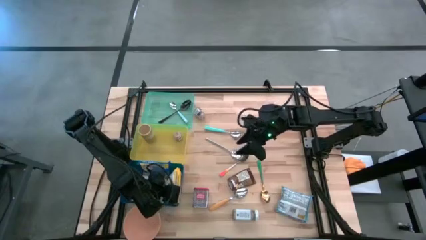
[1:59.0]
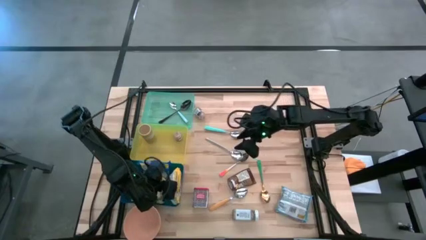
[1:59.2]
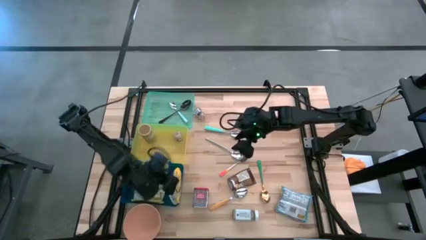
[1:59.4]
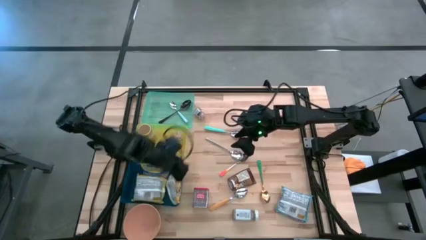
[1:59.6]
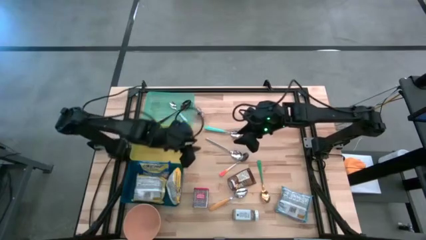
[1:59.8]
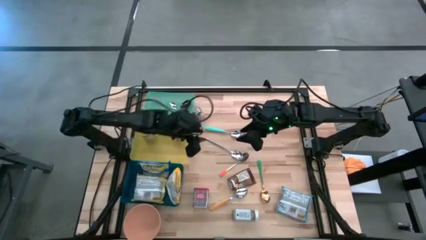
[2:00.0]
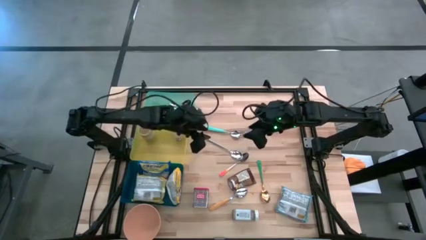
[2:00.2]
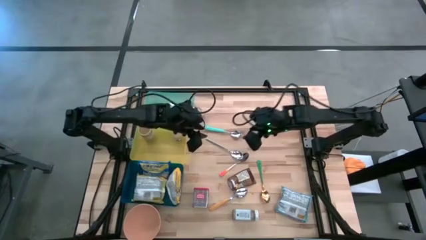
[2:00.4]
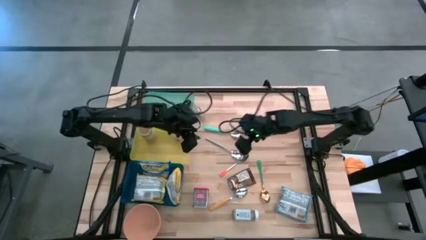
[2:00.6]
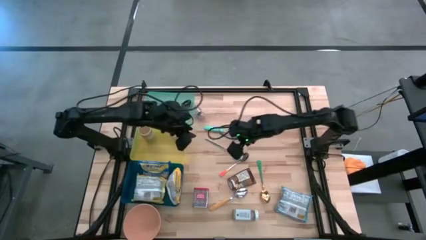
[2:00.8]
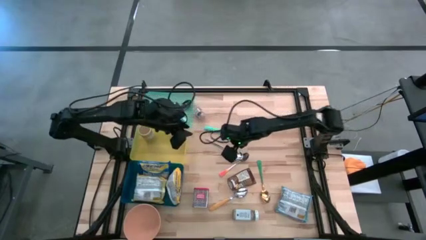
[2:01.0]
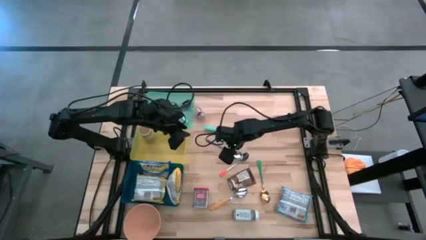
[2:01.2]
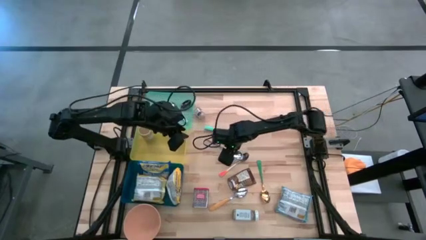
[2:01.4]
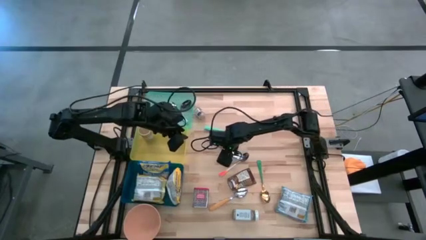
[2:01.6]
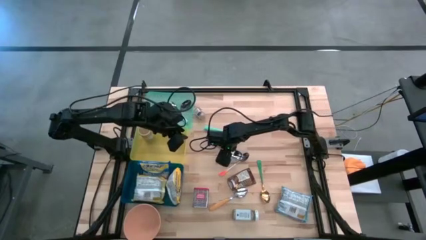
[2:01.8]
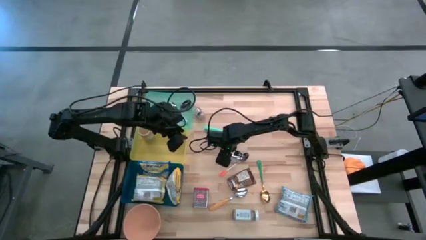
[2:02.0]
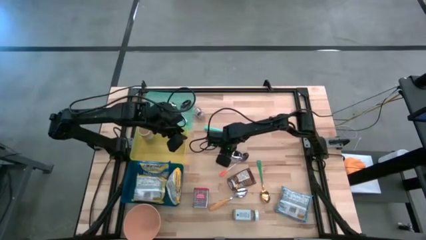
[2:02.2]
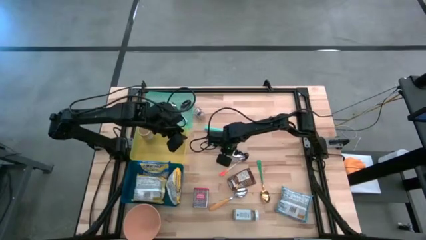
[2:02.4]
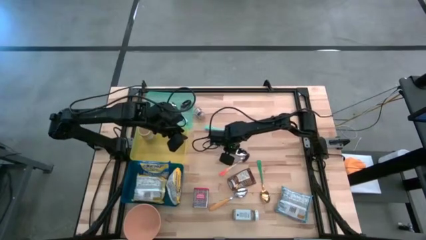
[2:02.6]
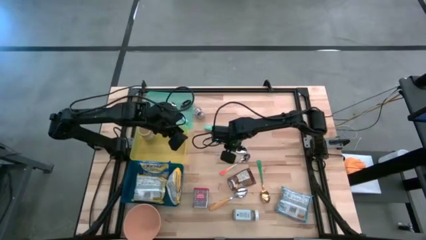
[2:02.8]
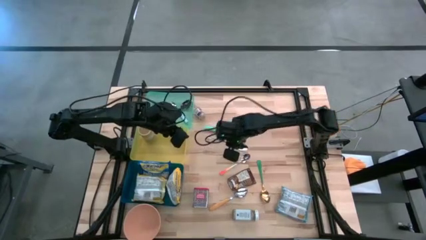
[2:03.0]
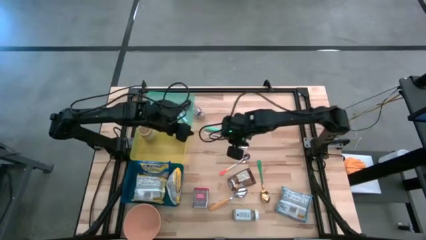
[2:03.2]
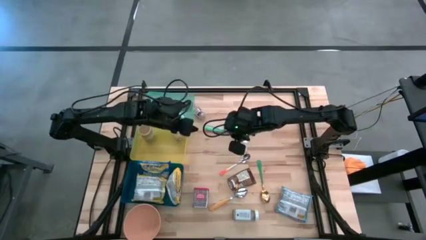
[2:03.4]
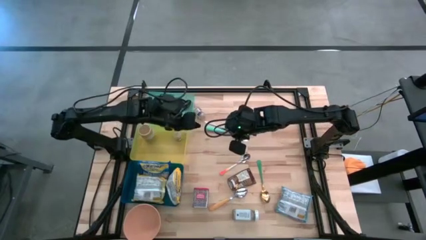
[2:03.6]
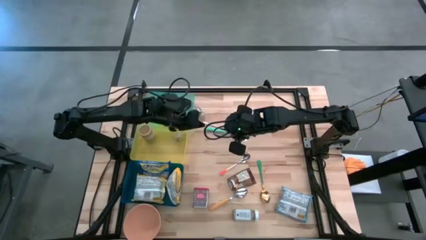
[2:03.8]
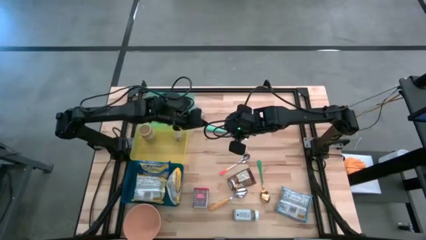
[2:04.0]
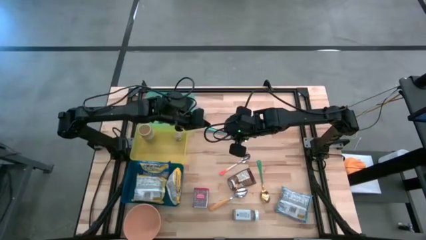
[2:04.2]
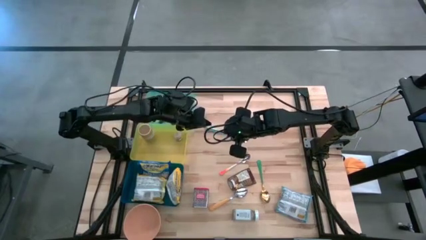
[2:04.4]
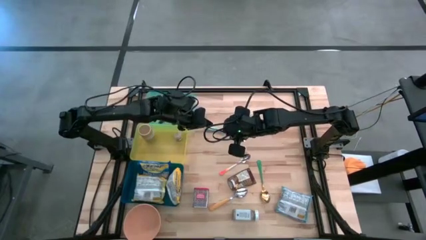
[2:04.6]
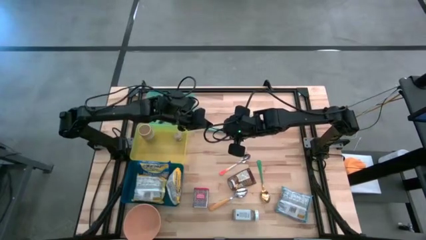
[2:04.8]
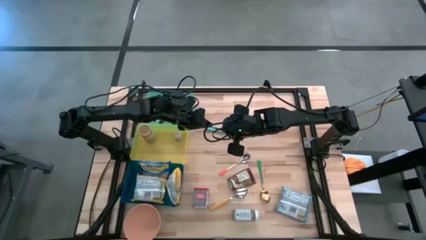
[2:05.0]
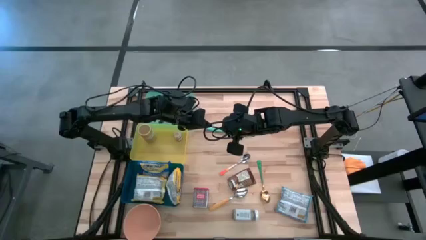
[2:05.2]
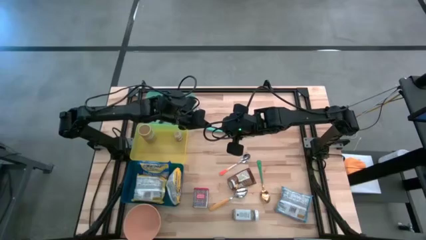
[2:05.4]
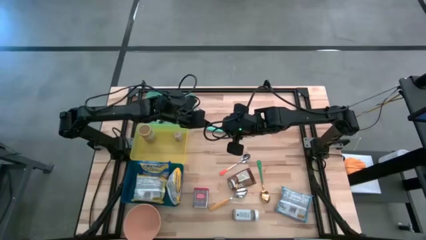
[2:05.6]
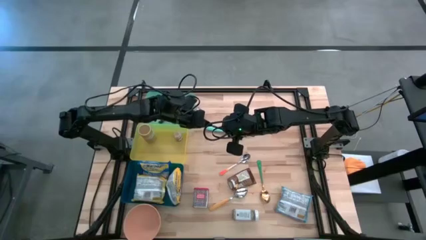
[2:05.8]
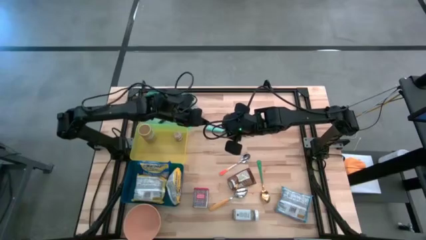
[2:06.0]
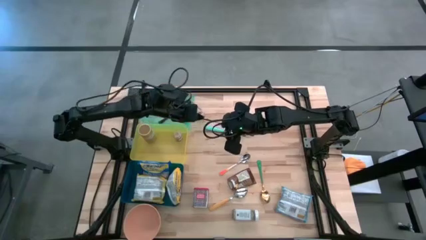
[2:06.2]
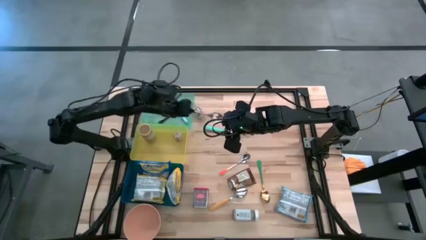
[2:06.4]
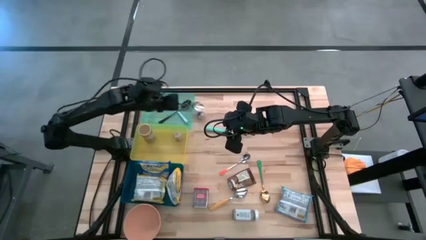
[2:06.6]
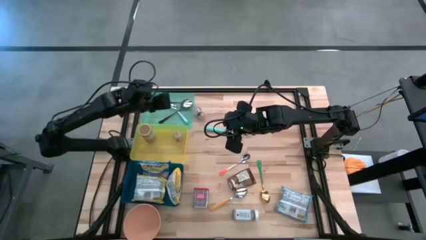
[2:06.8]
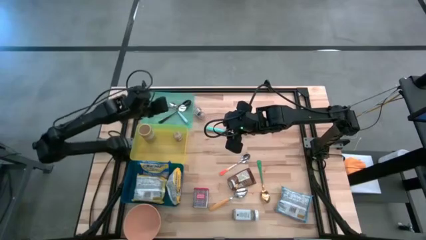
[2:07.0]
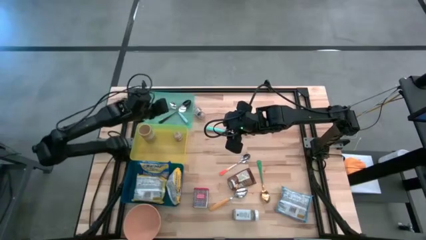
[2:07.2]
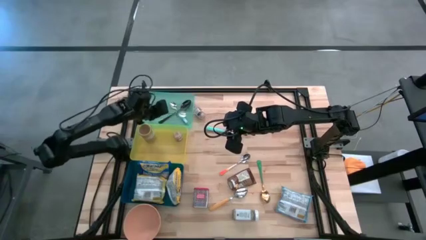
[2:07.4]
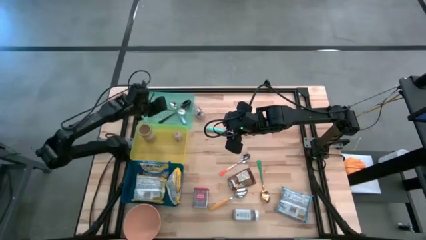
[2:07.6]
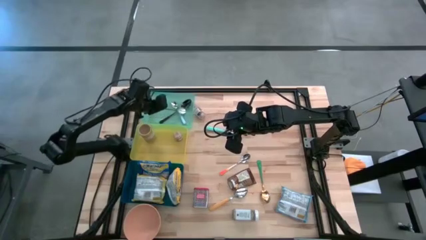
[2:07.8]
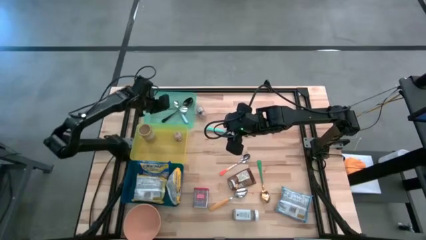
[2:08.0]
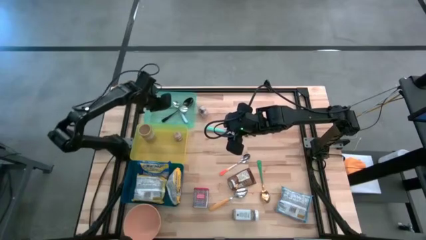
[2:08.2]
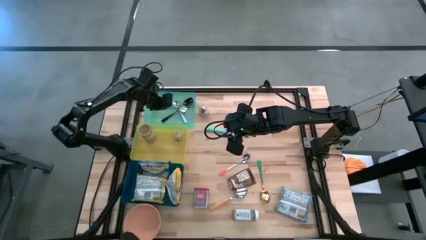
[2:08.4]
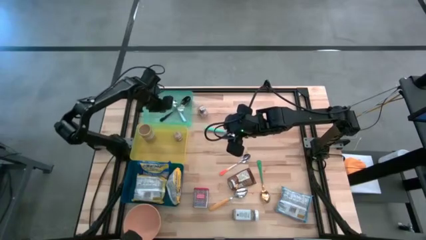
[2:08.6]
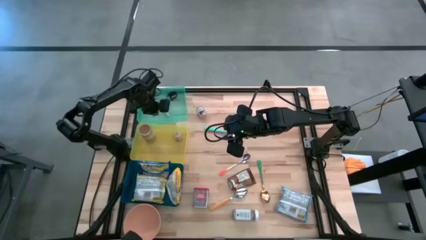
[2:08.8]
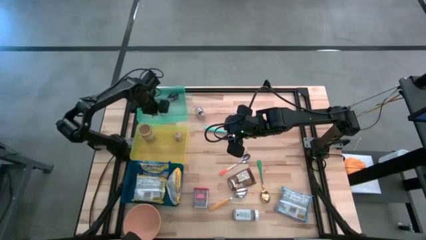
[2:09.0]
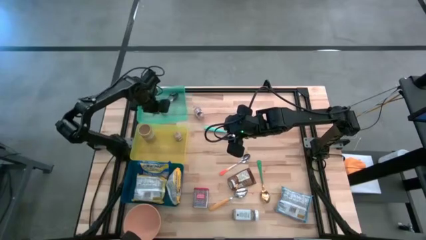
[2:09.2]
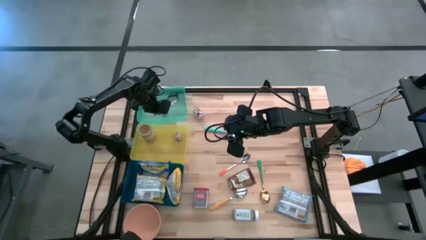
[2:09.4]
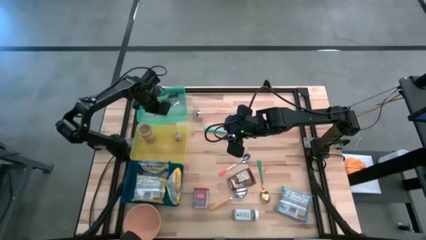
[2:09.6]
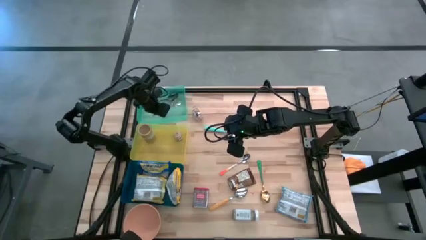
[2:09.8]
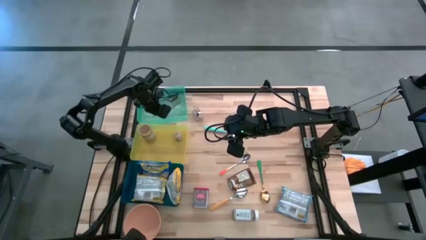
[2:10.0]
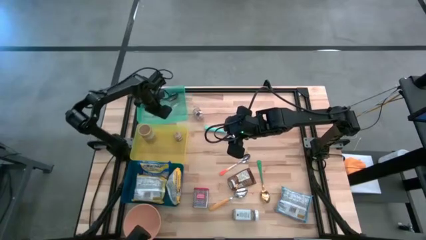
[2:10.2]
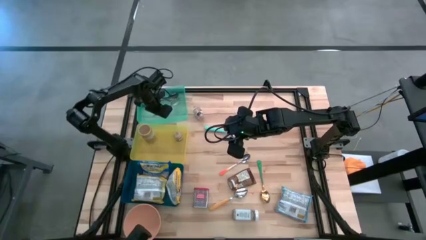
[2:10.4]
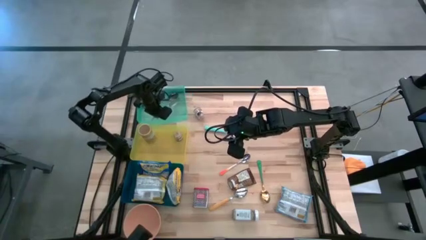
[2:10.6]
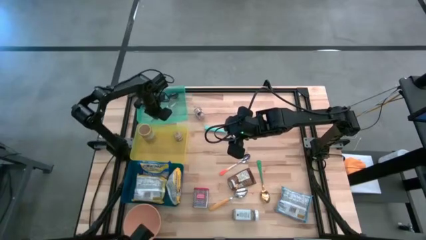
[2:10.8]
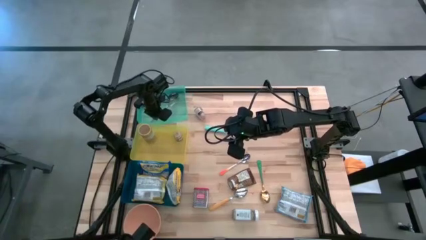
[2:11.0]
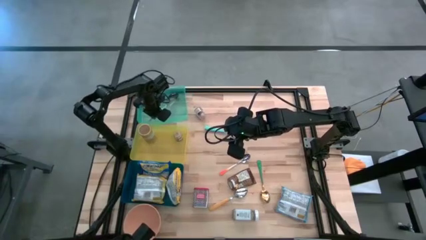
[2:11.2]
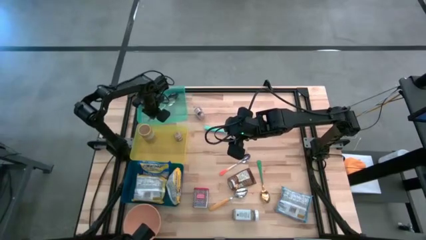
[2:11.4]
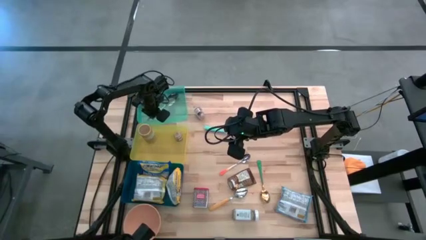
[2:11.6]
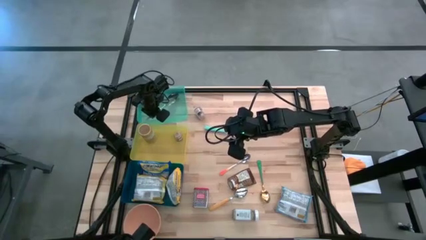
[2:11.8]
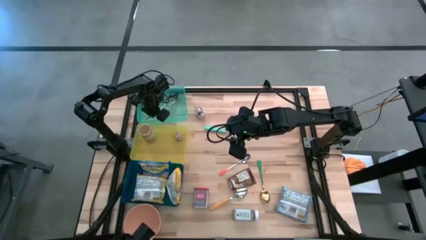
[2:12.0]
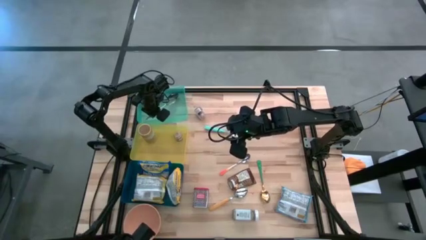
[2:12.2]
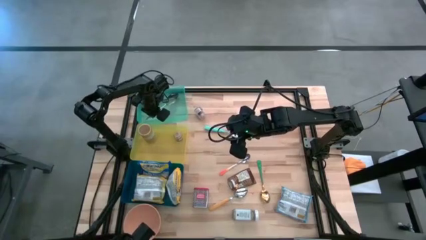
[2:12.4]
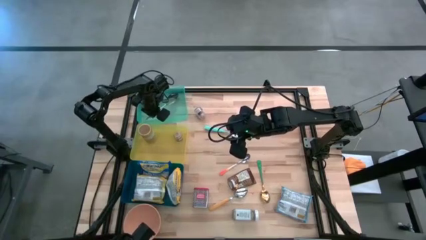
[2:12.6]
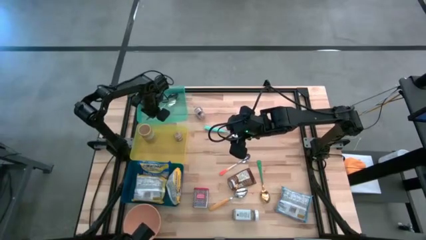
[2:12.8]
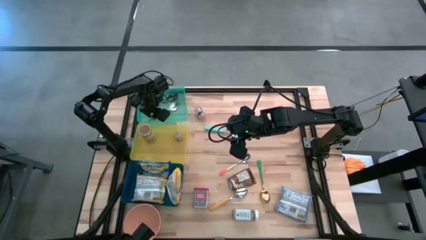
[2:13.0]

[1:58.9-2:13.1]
Put the silver spoon into the green bin
